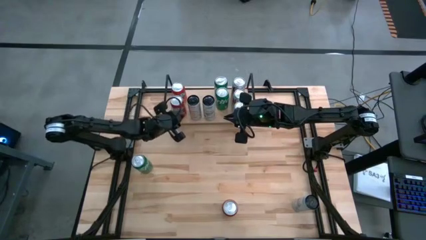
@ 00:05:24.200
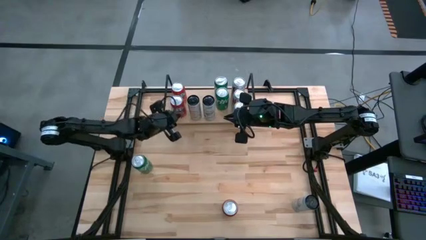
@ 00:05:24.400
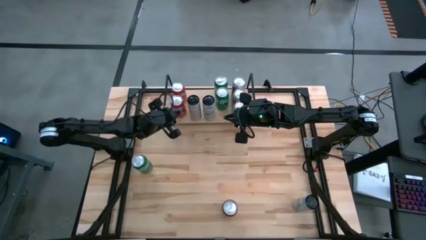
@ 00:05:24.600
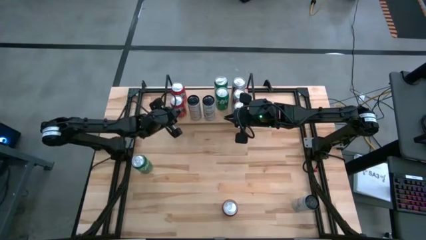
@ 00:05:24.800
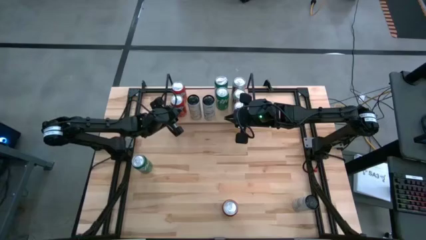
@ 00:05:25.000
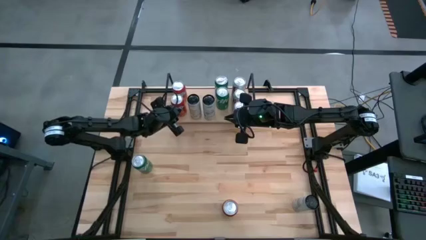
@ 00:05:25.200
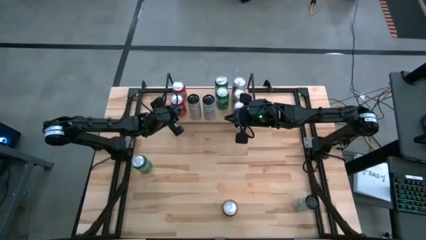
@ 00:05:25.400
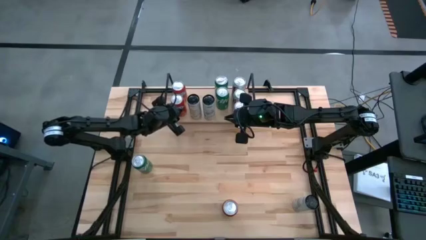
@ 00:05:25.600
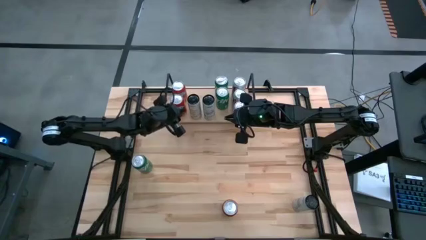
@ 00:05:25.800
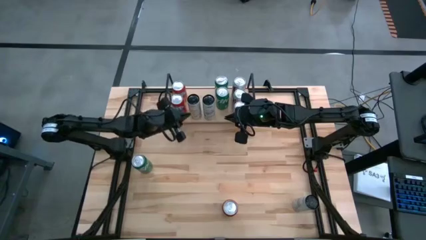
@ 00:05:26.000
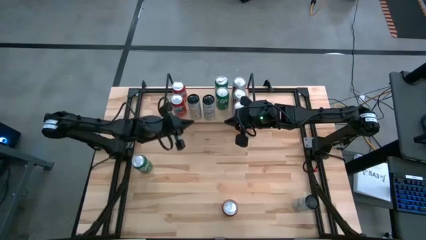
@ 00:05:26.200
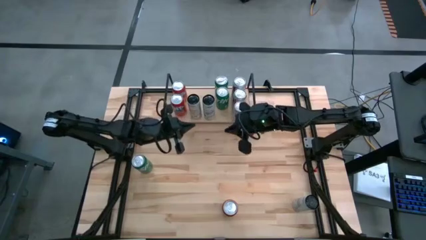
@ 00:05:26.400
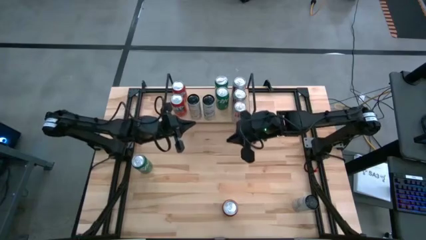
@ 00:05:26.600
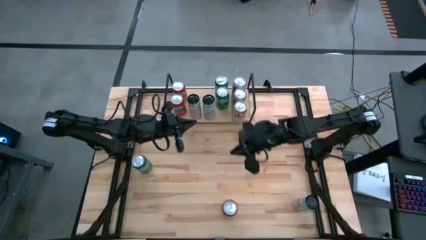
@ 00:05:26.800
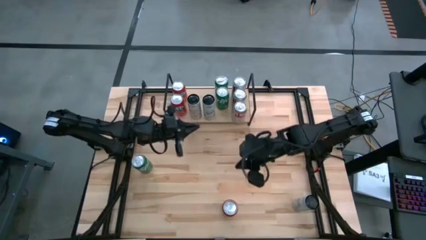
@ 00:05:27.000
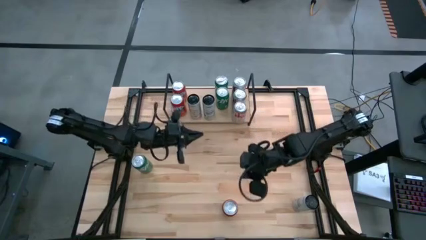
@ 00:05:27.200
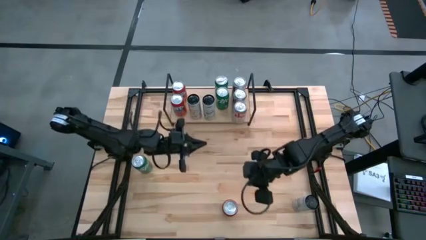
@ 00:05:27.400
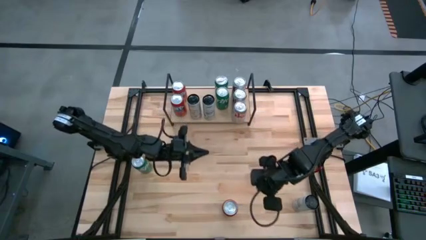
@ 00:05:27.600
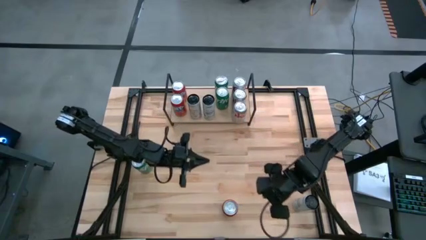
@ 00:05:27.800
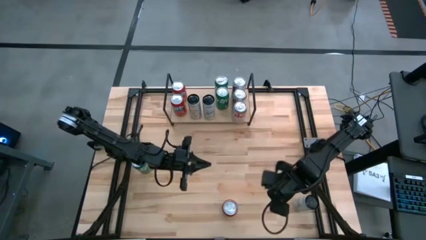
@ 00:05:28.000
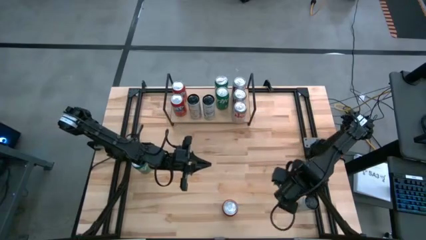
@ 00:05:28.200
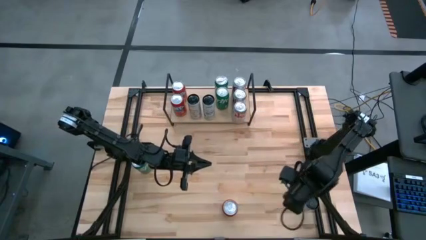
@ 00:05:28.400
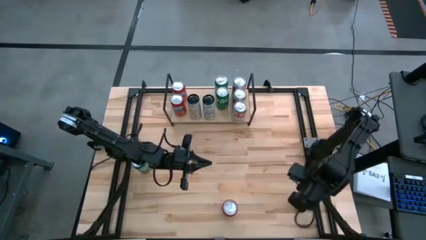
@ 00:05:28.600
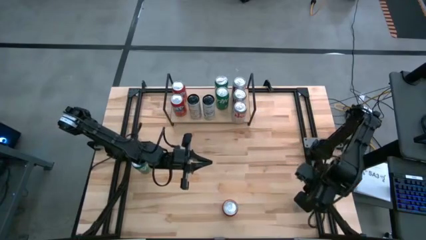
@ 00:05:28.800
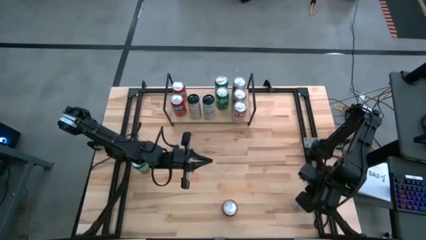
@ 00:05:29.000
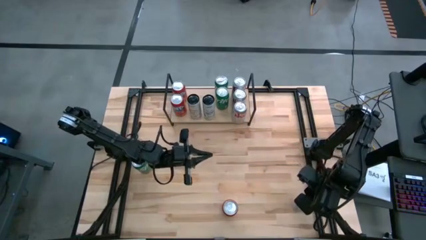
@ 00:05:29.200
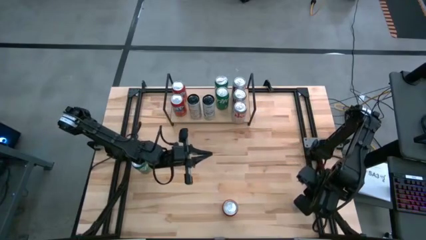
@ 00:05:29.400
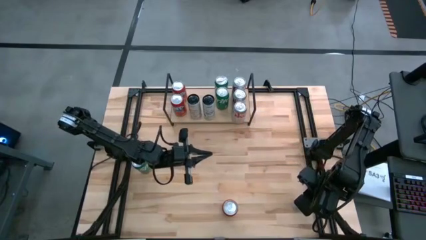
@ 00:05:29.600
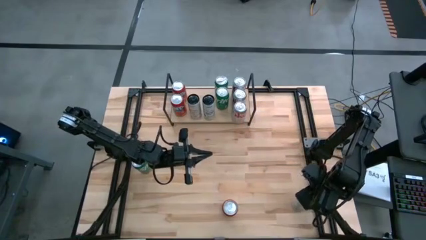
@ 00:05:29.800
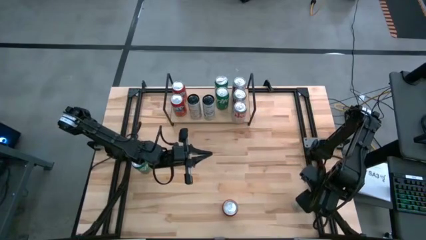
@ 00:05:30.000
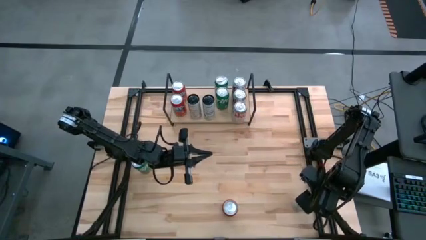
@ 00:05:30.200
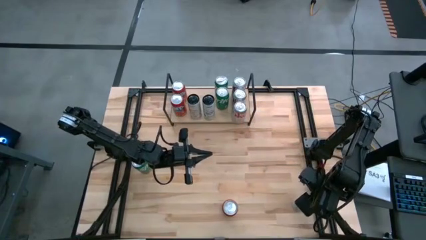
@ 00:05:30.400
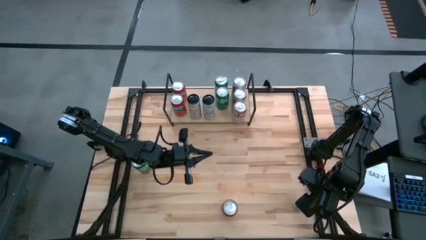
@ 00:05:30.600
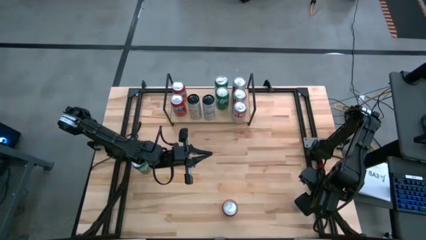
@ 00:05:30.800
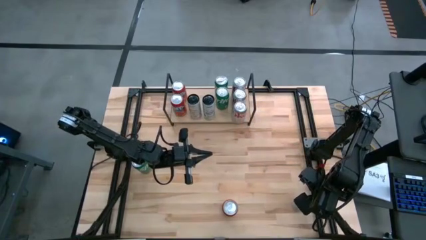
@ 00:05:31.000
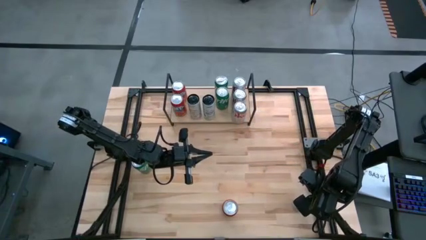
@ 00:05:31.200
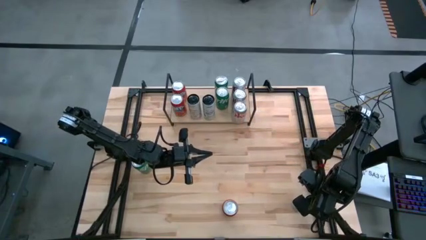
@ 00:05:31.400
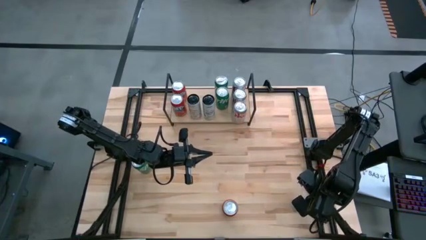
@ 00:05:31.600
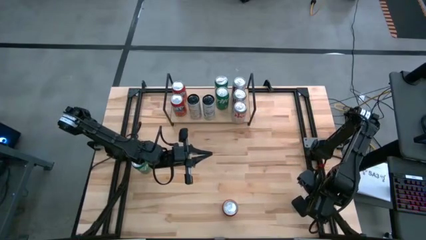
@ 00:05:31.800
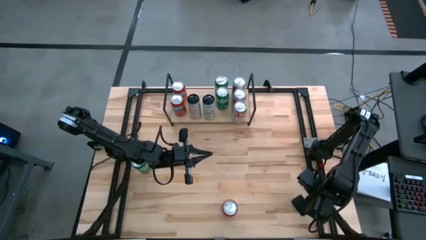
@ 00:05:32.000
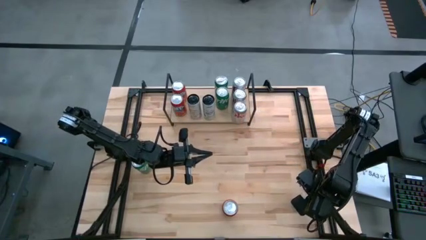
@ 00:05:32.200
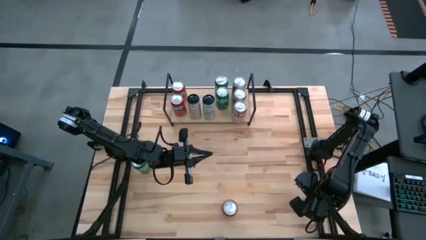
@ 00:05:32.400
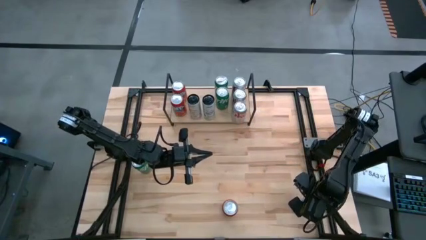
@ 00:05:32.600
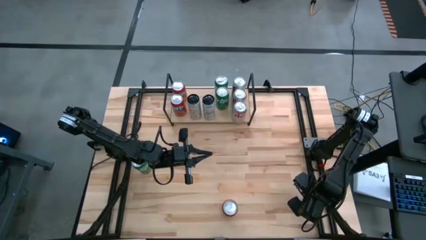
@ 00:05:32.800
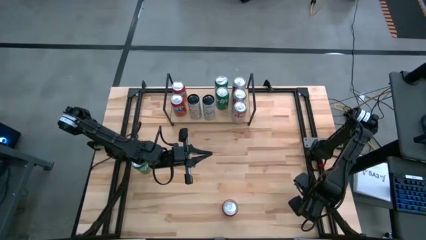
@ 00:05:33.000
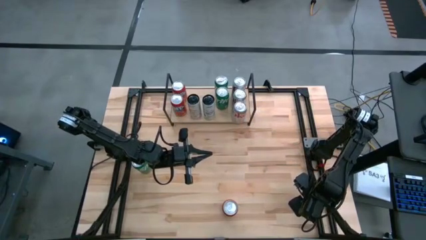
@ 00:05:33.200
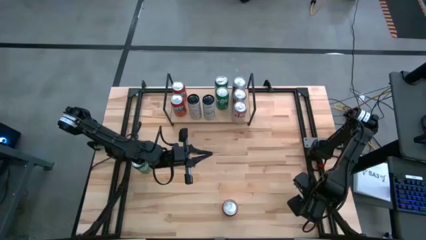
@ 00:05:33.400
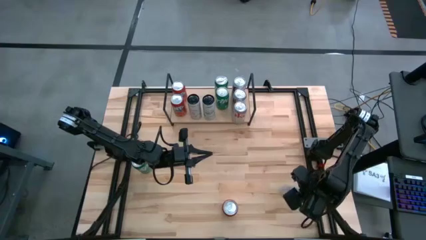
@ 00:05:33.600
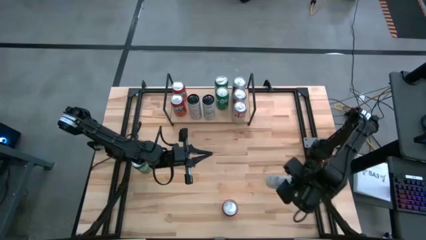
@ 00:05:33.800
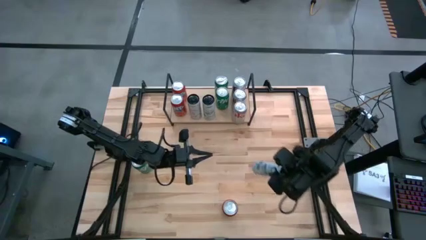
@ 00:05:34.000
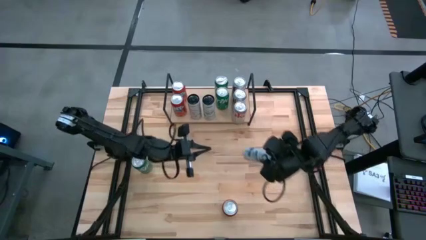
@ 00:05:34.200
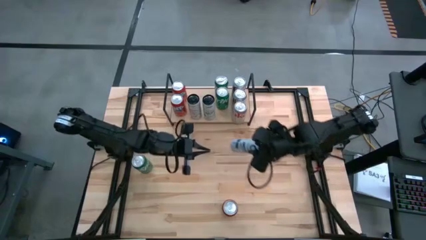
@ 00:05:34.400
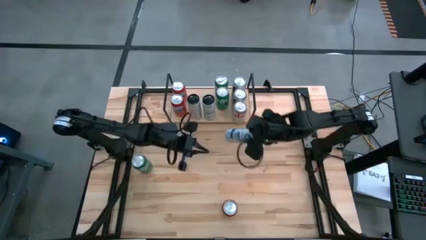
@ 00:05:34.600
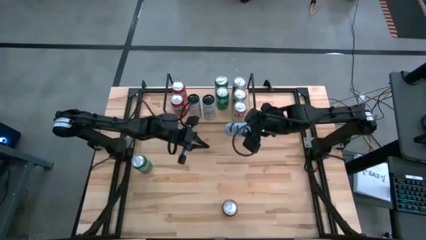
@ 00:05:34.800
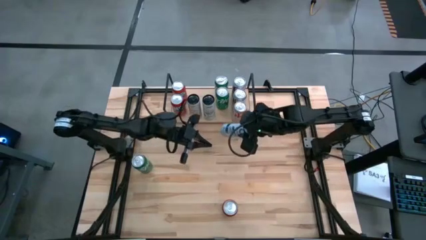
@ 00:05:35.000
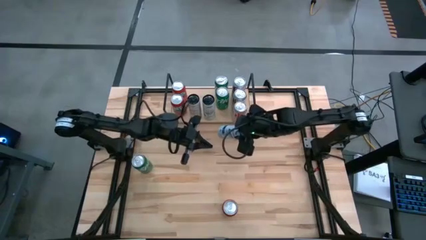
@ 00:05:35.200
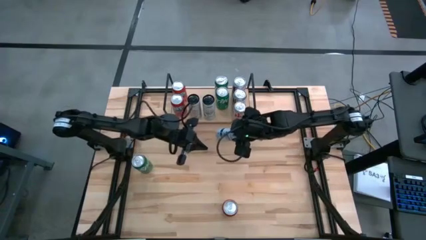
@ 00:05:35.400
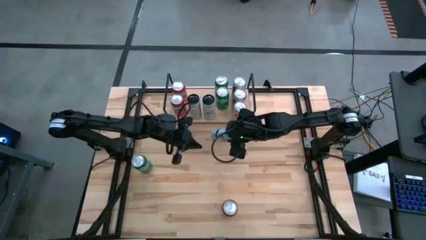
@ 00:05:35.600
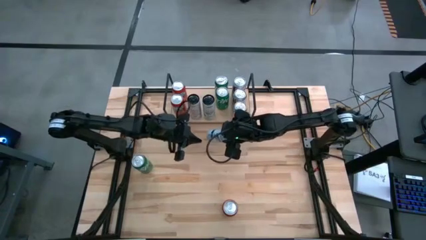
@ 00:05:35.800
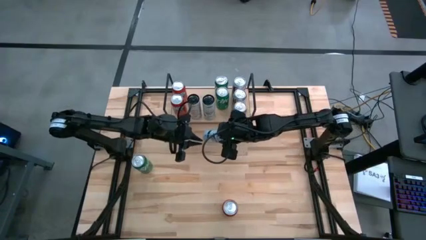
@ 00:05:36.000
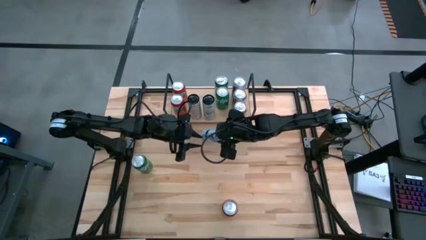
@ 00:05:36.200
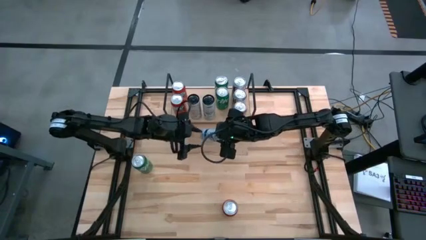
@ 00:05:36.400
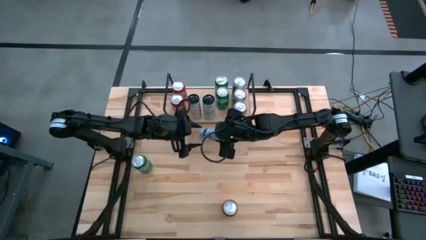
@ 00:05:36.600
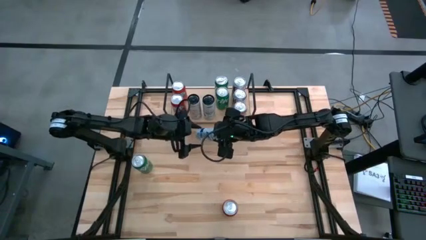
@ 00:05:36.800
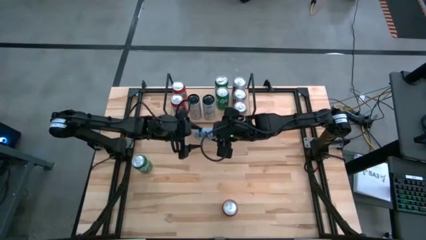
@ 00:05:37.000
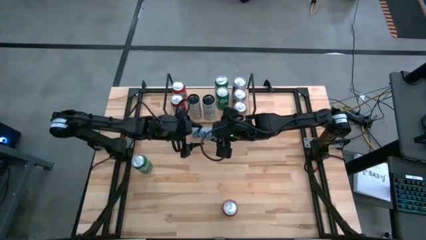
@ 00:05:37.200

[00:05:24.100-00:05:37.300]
Task: Sort soda cans
Put the white blue soda can on the shelf and align it with the other white blue soda can
